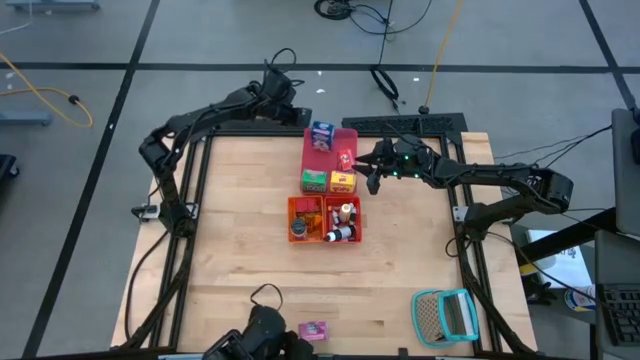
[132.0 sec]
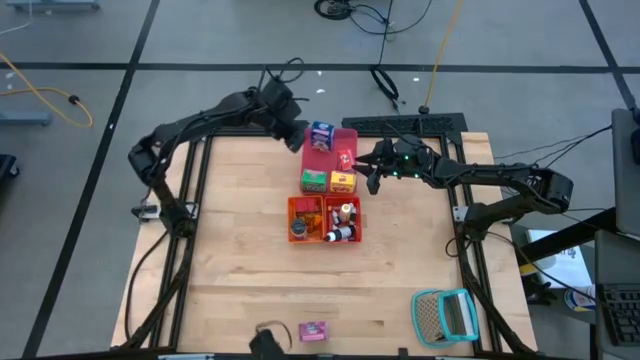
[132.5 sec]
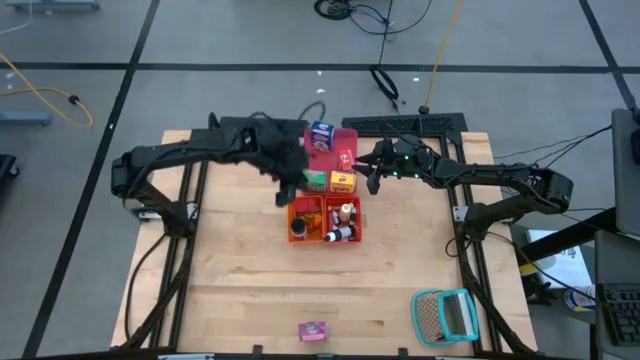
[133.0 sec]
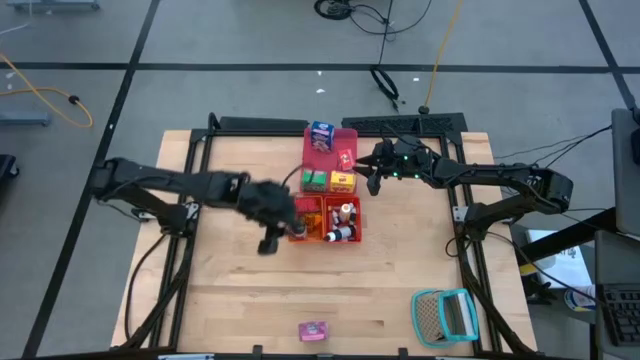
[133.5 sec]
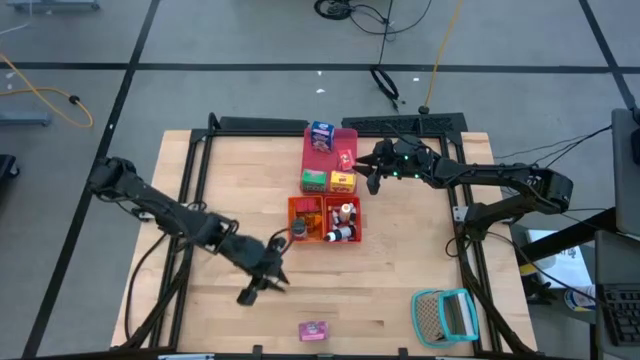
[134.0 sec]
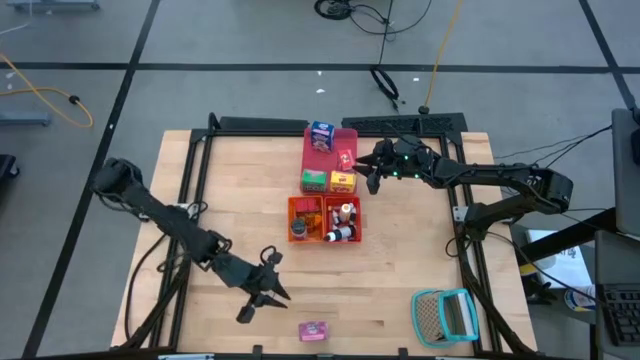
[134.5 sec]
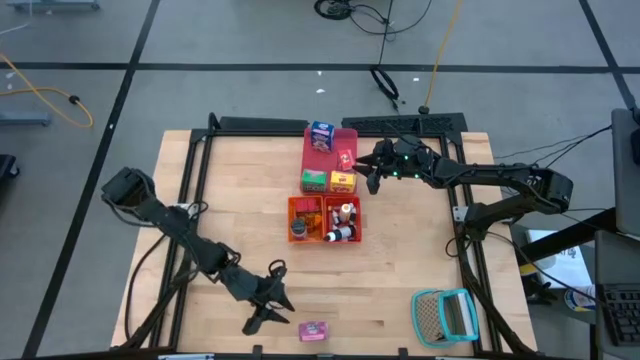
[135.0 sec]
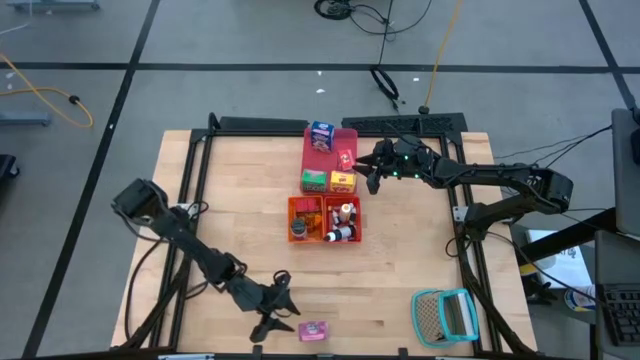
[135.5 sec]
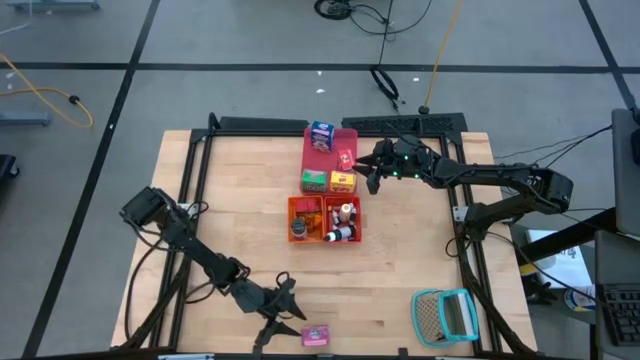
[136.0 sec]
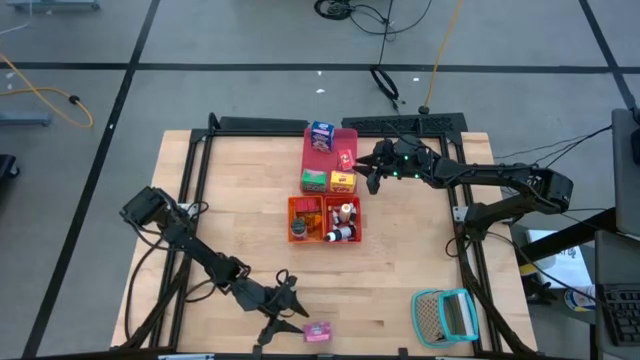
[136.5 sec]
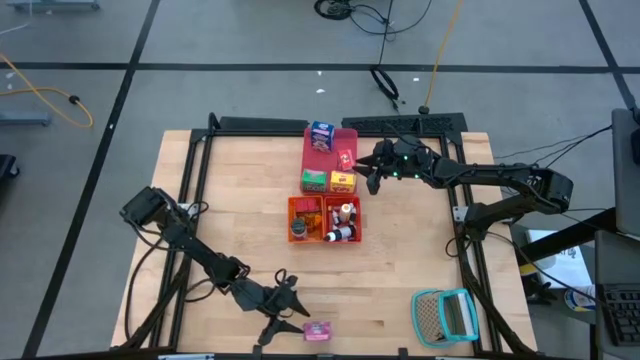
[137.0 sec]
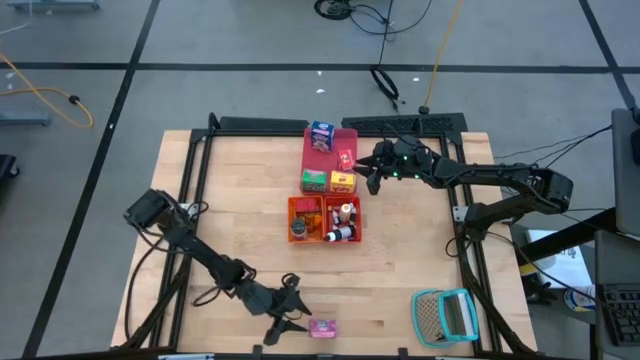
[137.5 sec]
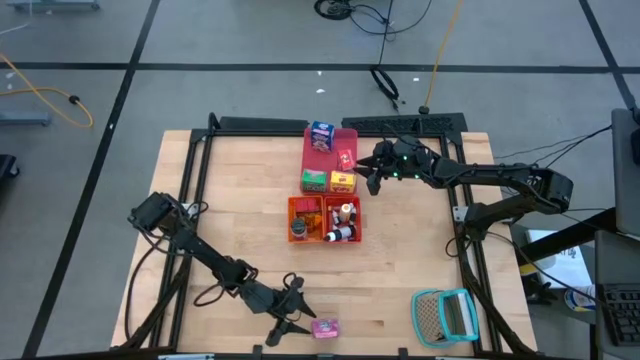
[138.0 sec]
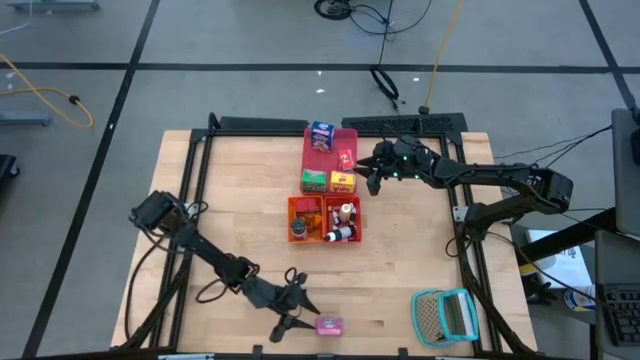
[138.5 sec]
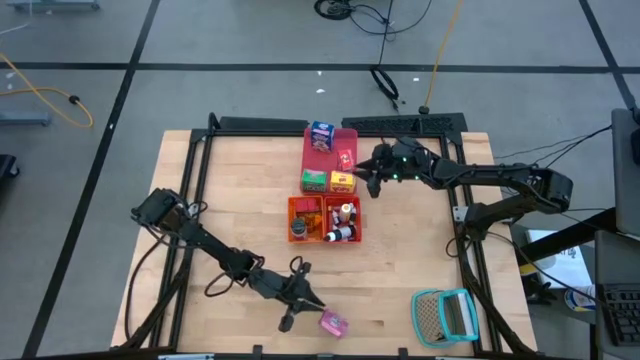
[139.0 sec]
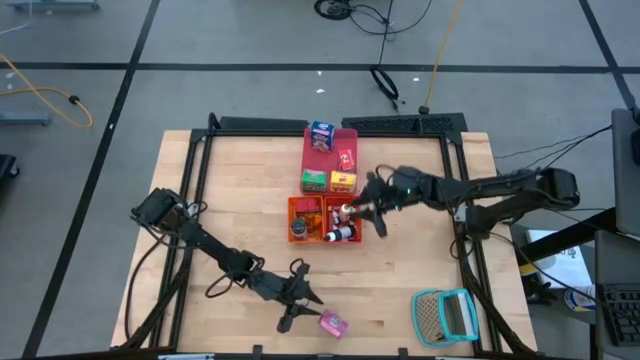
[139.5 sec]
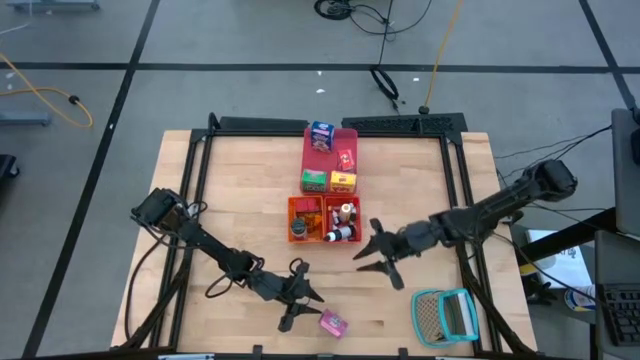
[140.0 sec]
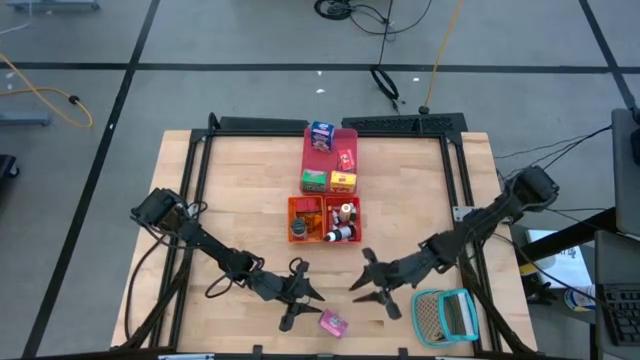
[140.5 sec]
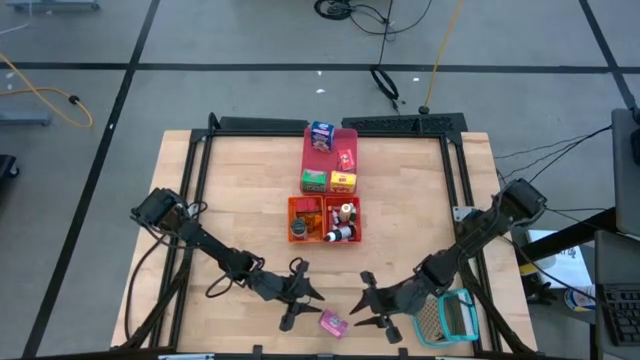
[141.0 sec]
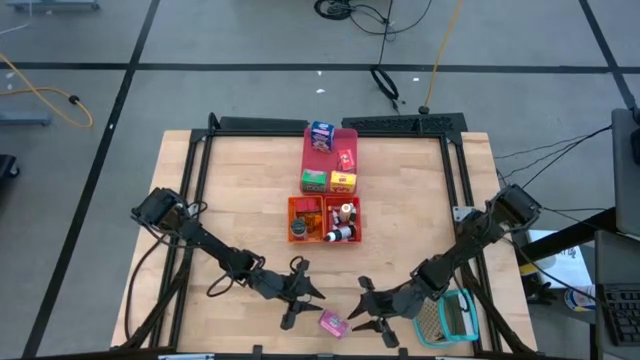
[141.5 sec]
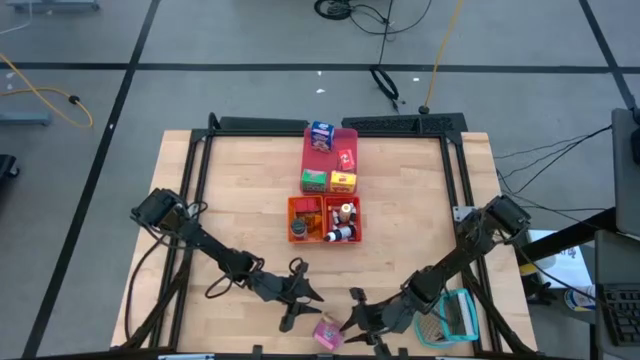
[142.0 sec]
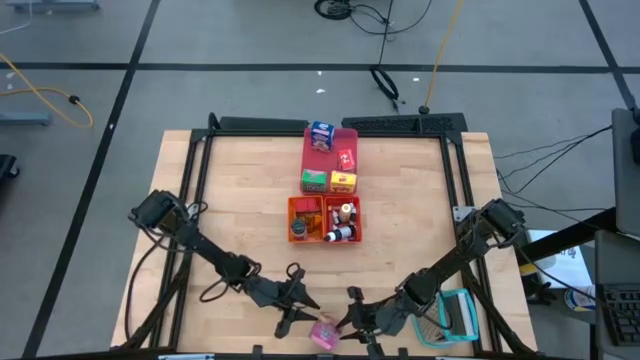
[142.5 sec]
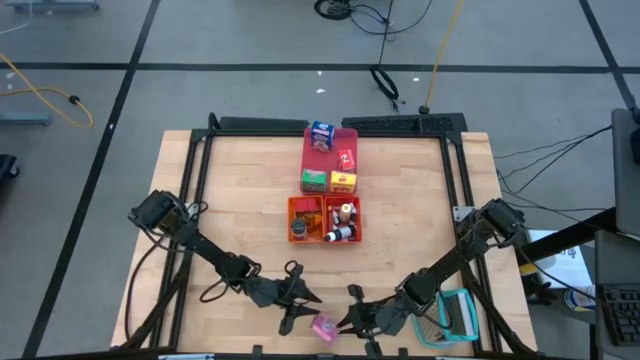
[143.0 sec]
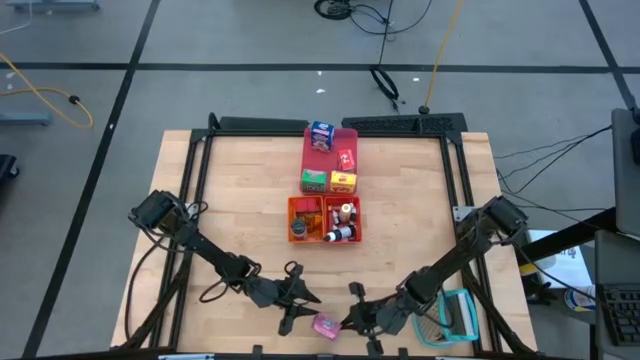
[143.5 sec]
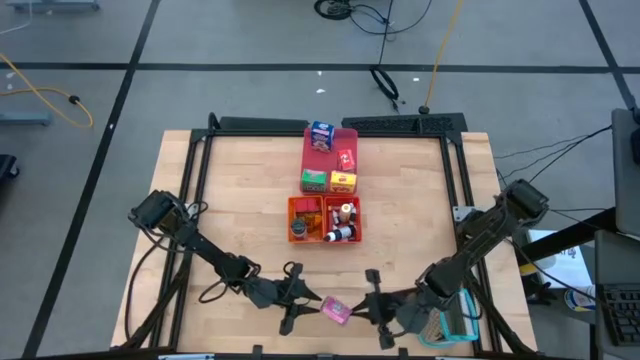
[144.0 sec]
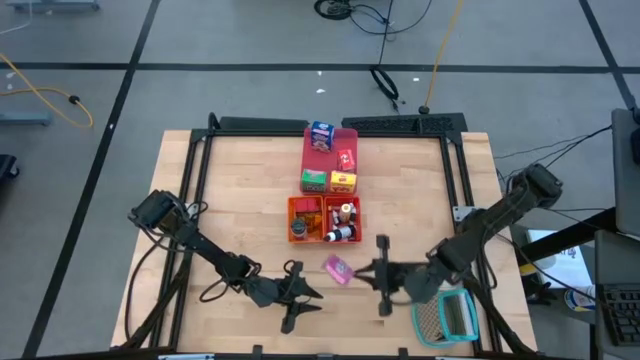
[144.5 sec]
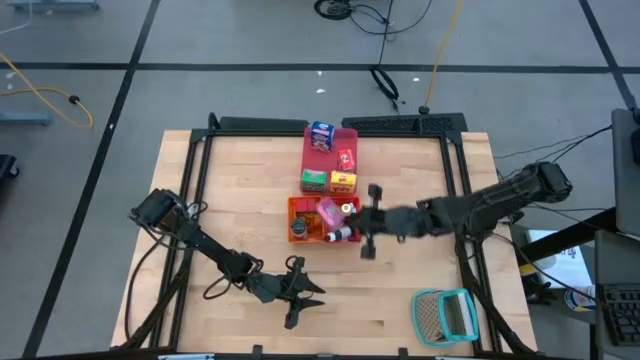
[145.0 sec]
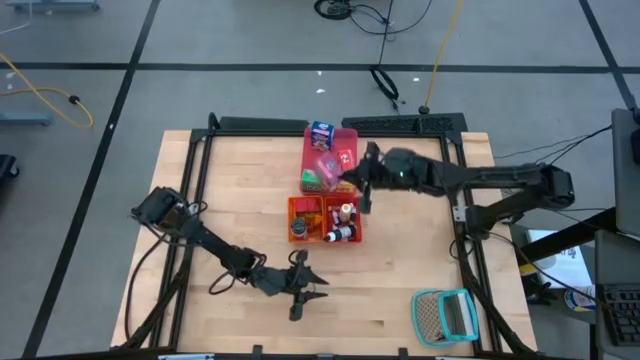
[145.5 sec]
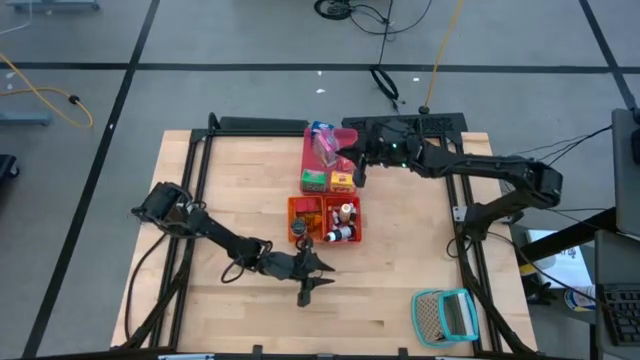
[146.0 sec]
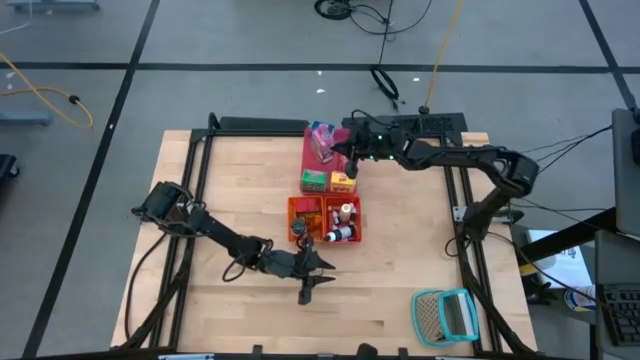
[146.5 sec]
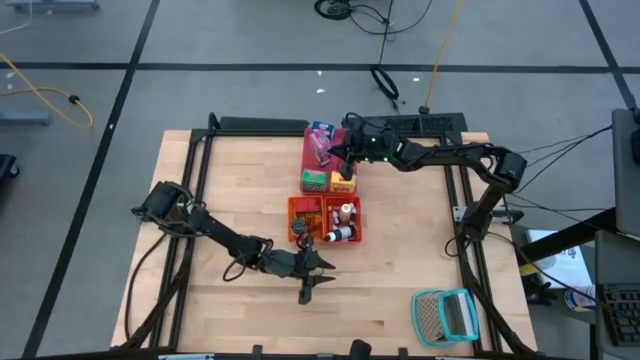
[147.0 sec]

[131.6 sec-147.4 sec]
Task: Pick & Place Kitchen Items
Put the pink raisin bran box into the pink bin

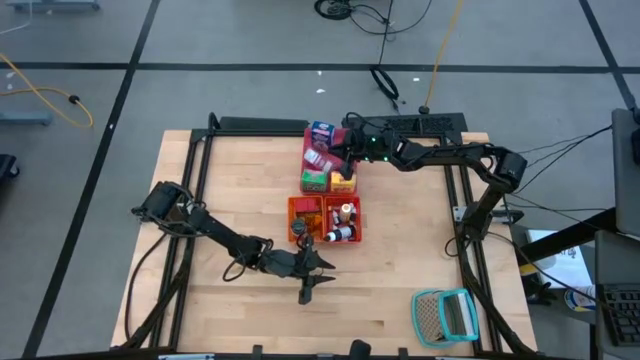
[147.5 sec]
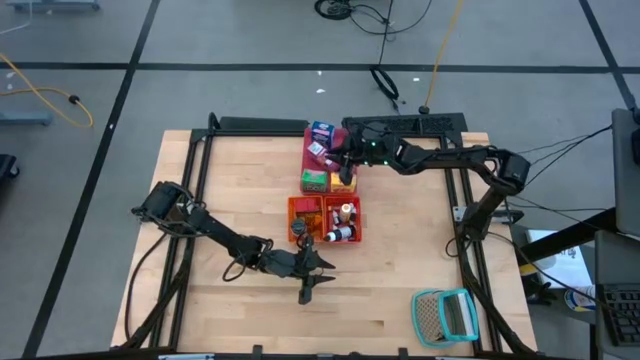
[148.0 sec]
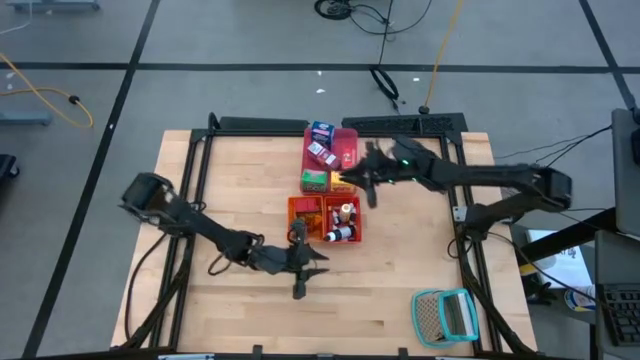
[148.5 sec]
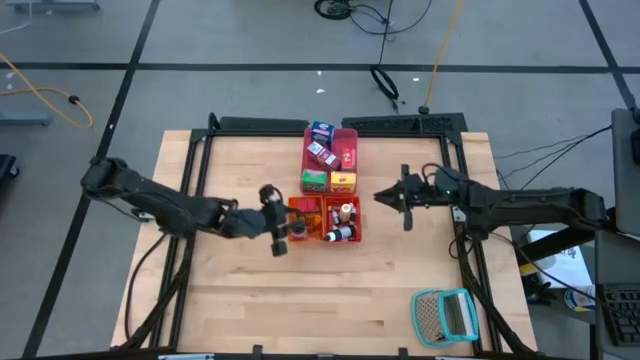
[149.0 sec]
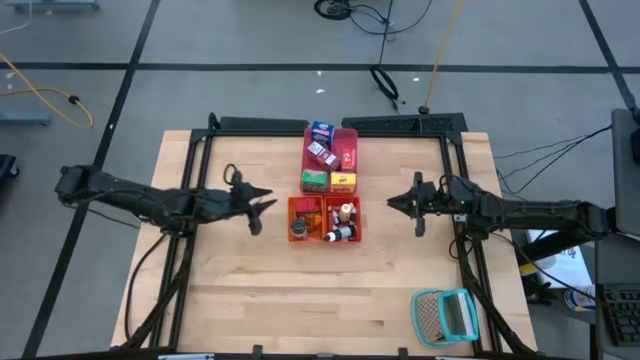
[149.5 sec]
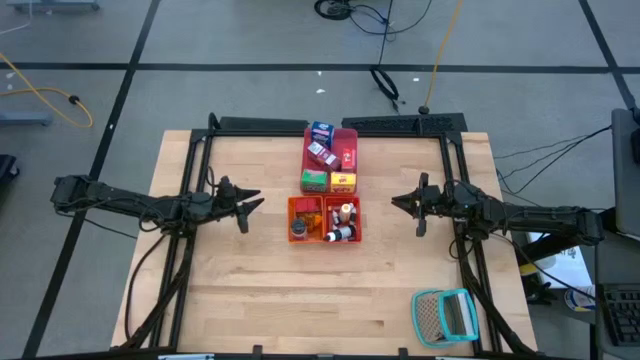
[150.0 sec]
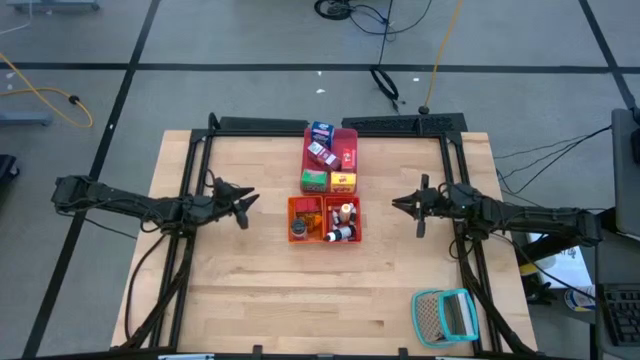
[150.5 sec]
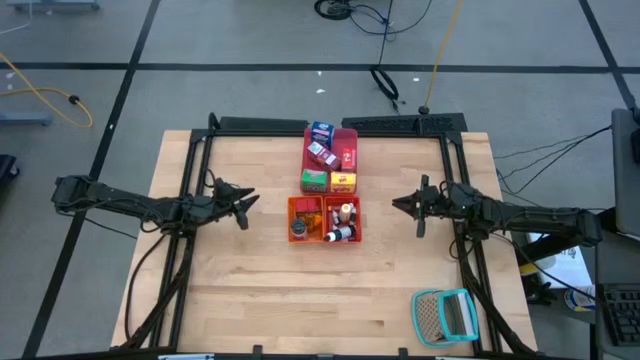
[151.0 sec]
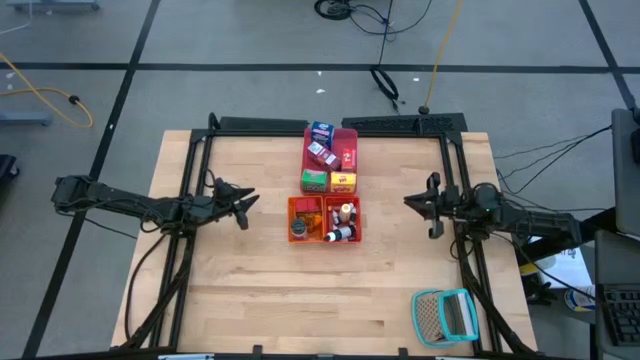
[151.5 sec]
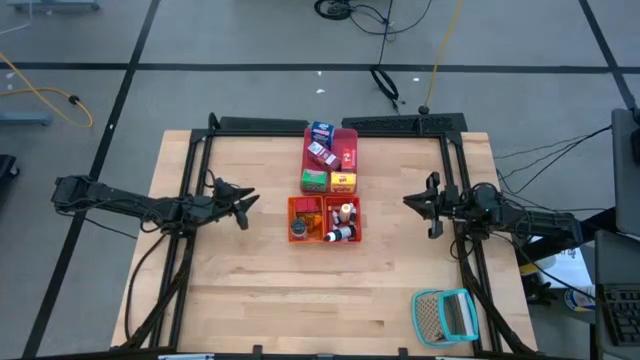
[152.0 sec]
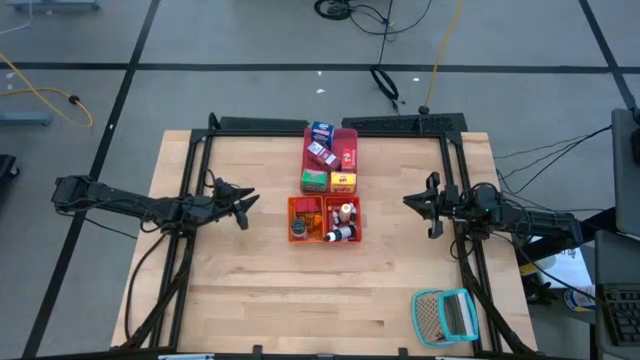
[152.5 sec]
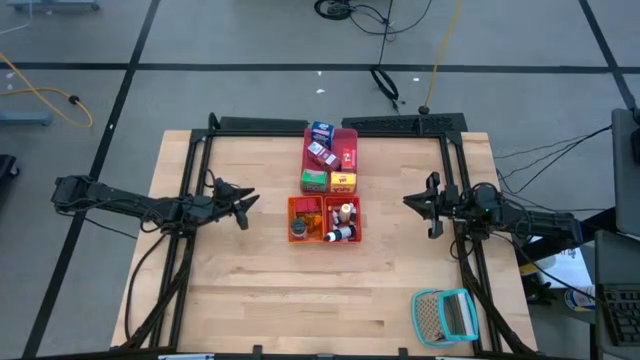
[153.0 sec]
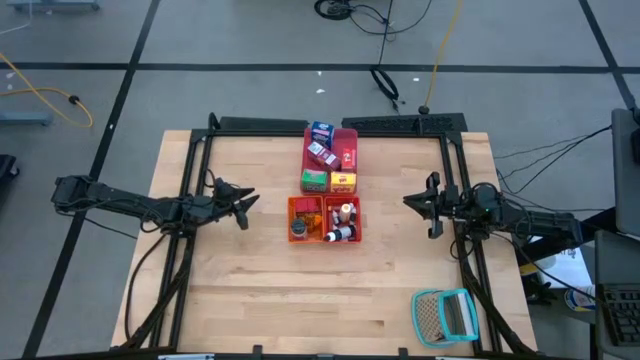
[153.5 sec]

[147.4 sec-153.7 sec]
Return to Home Position
